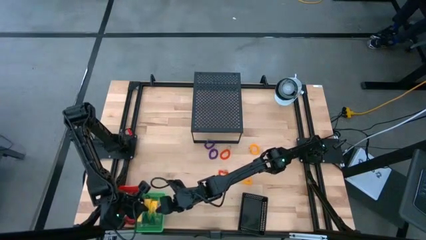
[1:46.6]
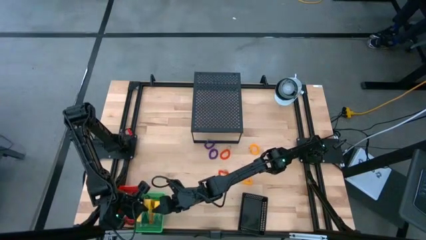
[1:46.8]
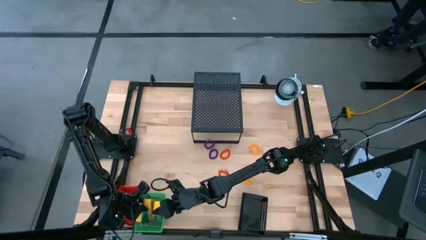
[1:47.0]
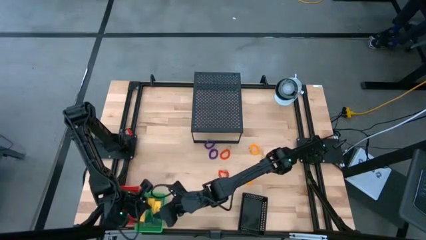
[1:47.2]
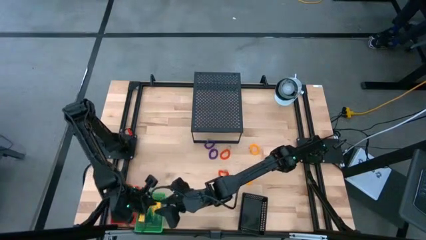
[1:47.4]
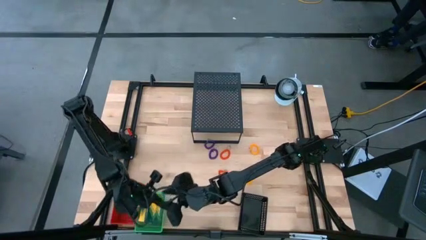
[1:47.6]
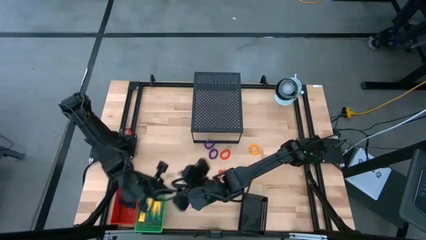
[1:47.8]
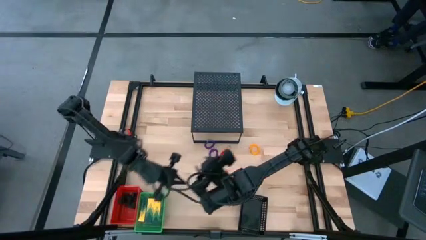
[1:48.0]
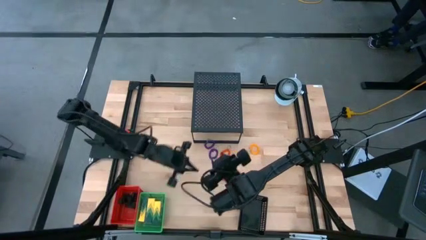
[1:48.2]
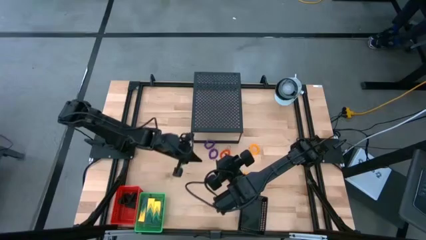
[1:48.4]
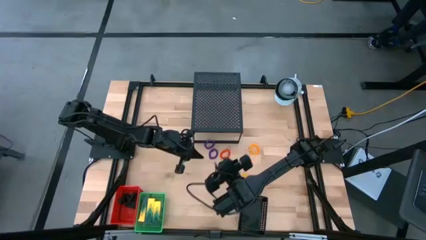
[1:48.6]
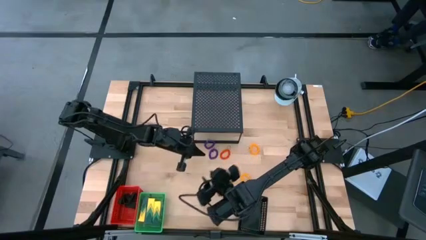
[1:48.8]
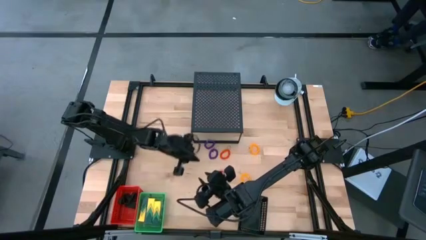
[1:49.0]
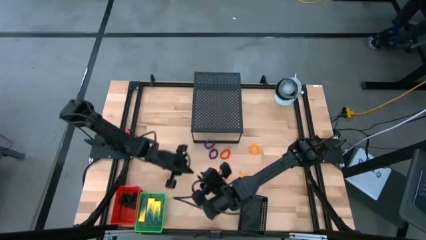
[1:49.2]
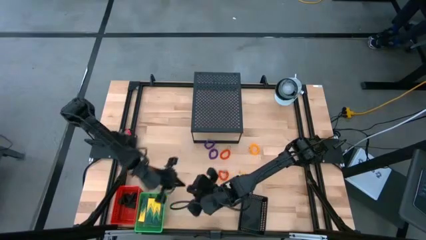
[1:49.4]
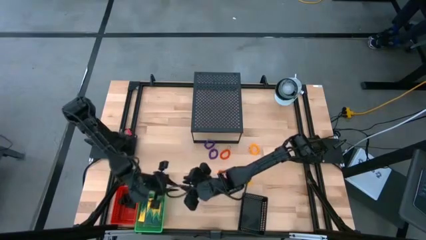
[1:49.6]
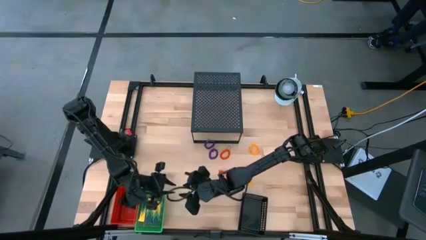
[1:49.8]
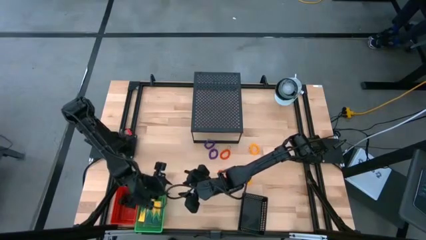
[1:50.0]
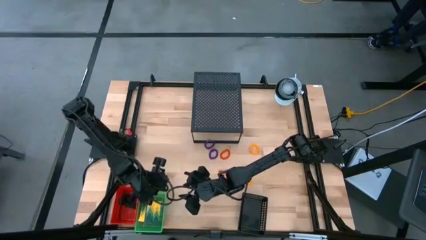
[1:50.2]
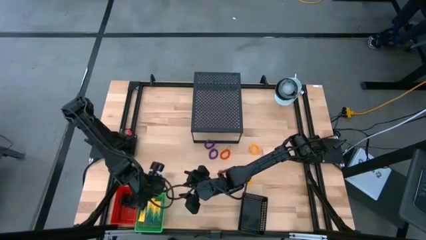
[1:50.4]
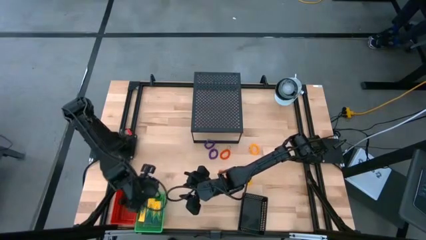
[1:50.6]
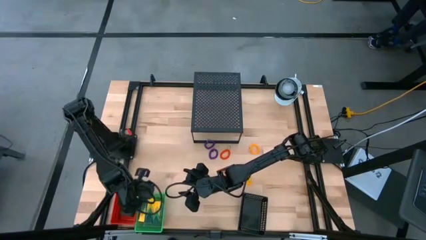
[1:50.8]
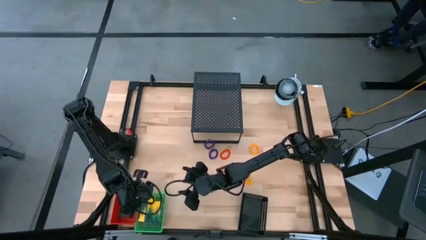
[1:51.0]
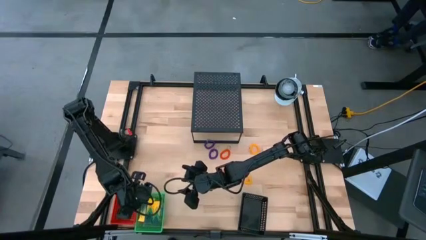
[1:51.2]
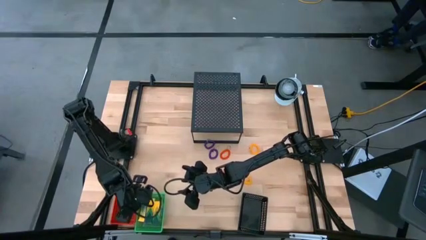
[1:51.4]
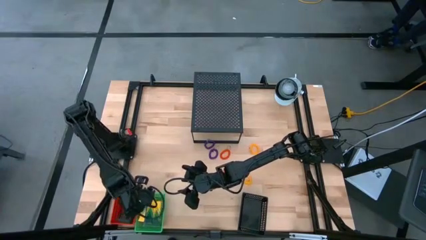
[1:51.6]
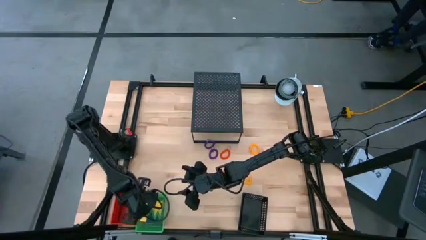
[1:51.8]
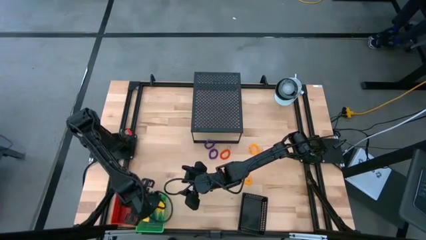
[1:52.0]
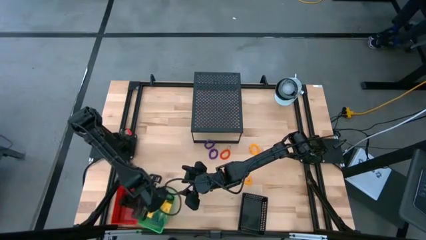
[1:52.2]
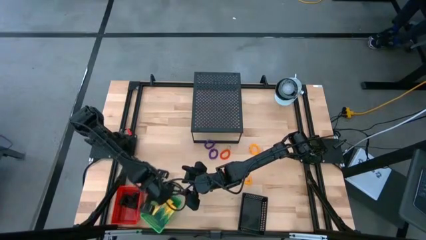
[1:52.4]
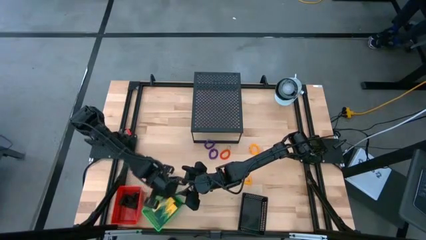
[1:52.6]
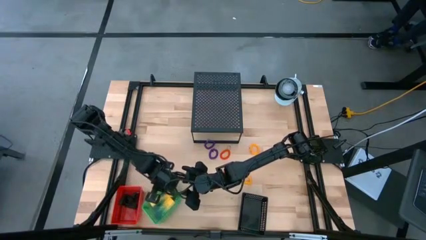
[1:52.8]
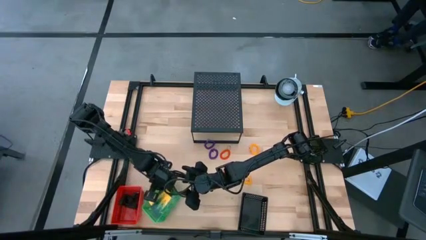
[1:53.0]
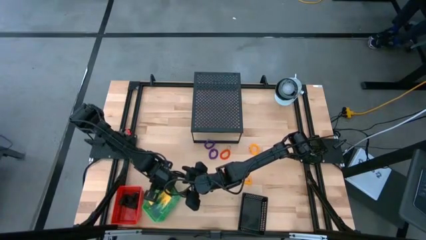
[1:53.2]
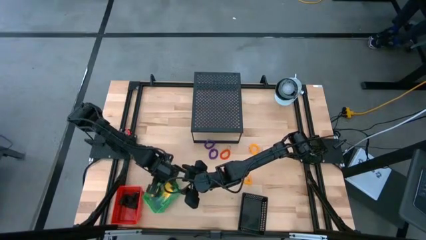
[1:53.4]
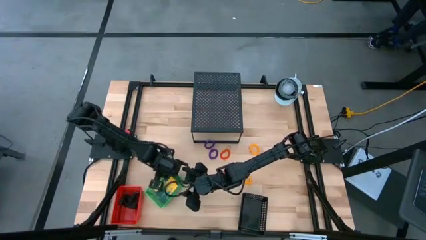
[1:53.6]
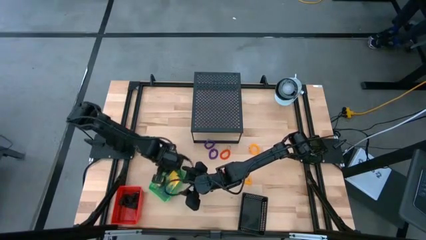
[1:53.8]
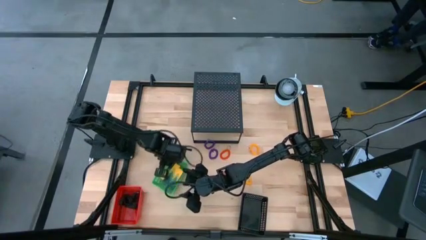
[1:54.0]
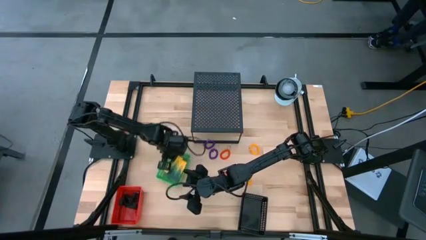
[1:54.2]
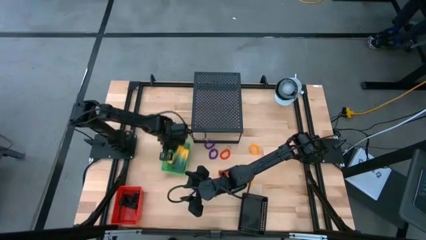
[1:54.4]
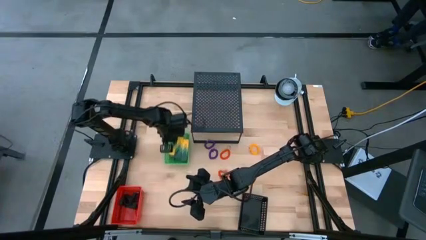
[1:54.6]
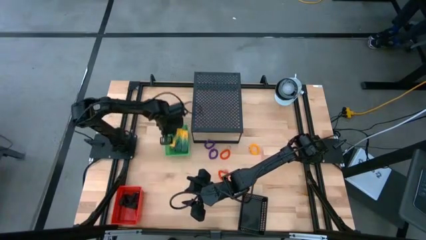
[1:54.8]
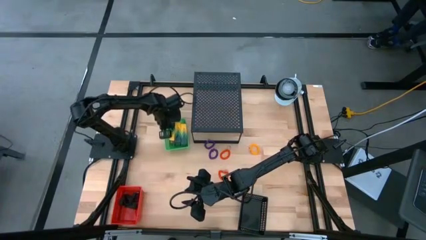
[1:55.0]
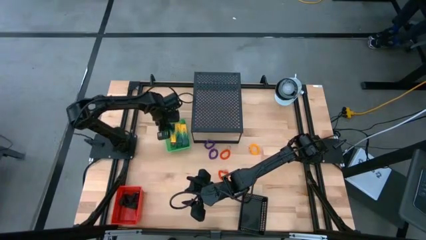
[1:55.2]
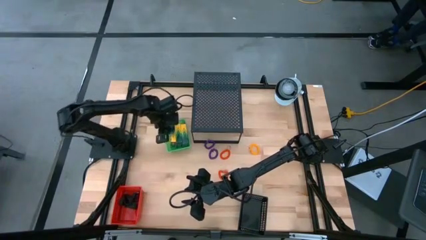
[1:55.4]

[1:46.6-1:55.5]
Task: Pick & Place Office Desk Supplies
Move the green bin to the top left of the table

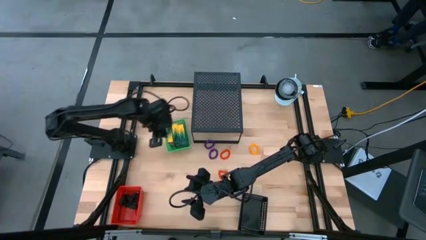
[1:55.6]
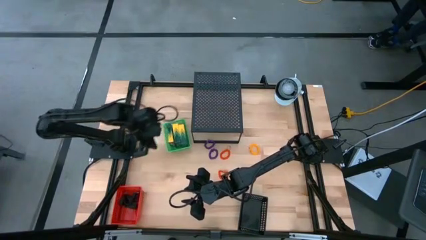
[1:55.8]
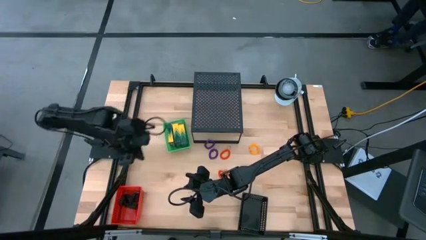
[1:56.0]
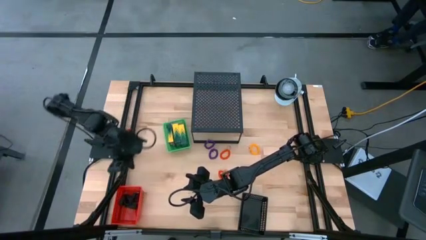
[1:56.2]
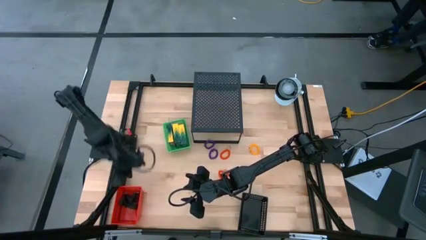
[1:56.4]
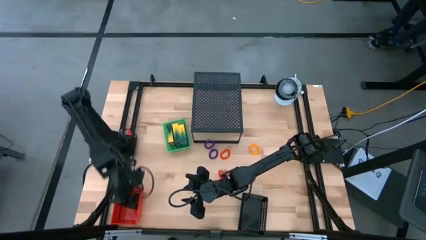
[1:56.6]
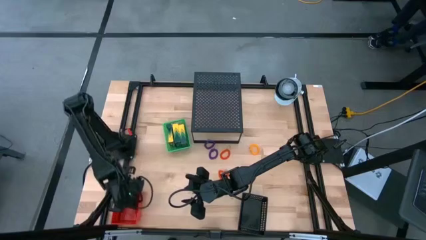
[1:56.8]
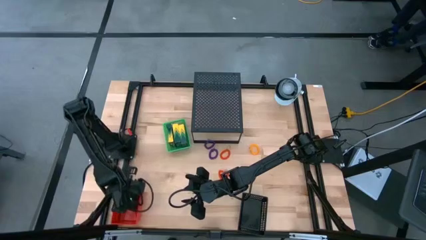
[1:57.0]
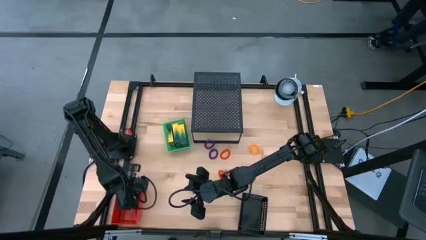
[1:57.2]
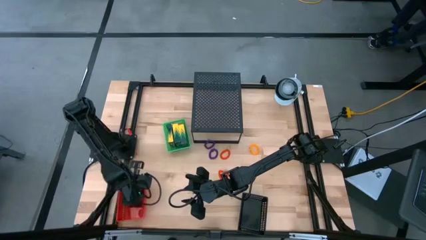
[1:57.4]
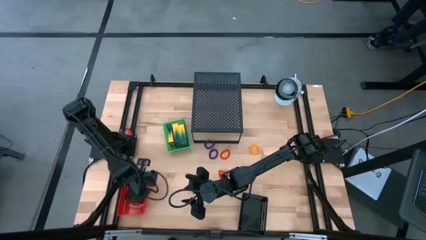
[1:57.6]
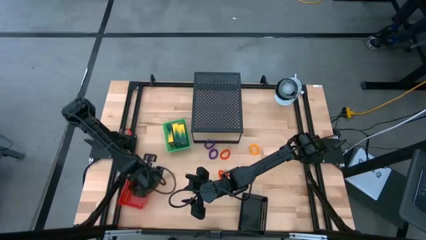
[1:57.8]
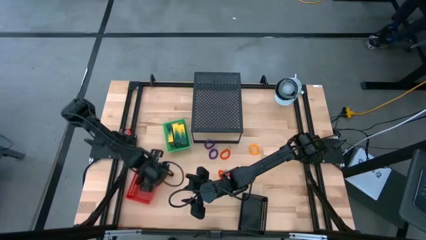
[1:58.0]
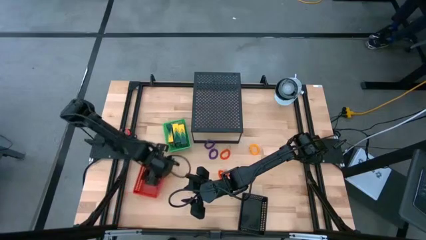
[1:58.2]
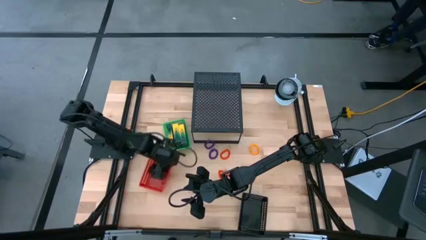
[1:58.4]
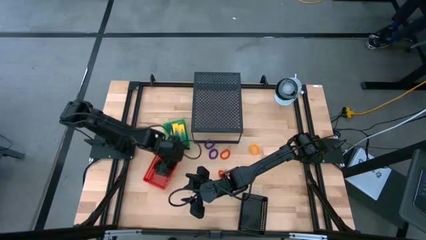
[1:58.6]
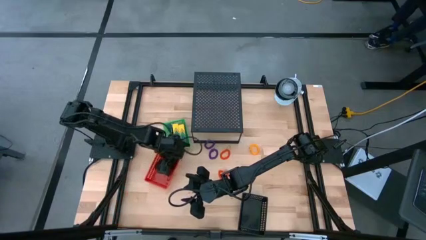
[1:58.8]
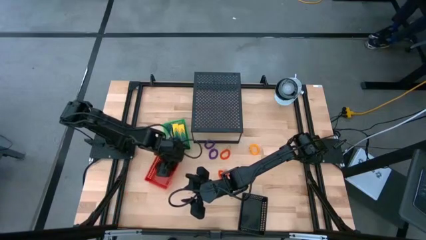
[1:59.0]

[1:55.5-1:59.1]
Move the red bin to the middle left of the table

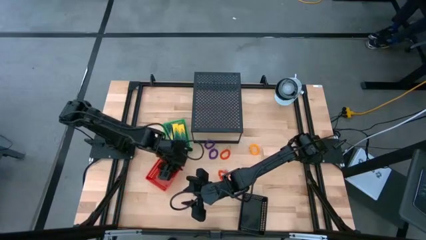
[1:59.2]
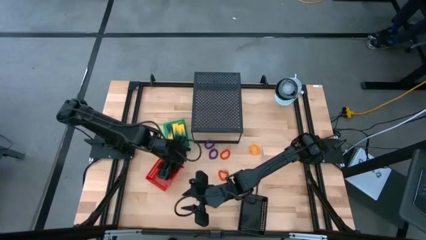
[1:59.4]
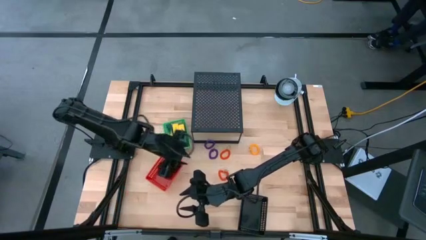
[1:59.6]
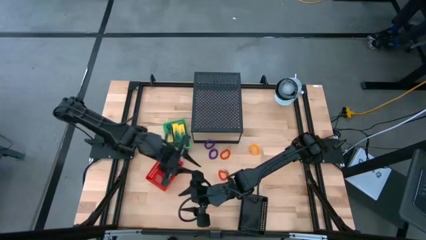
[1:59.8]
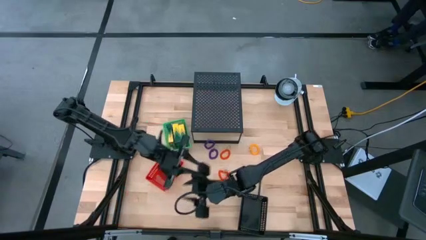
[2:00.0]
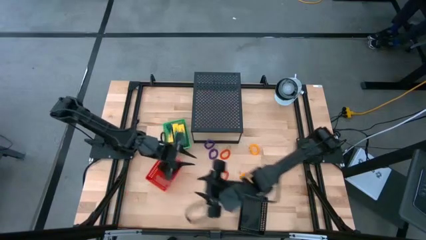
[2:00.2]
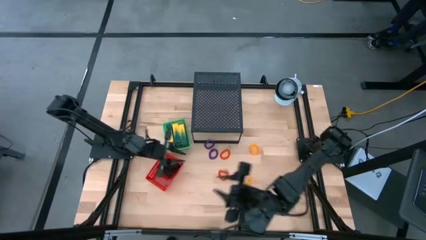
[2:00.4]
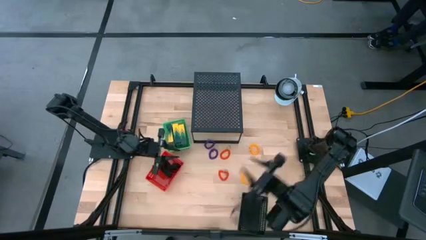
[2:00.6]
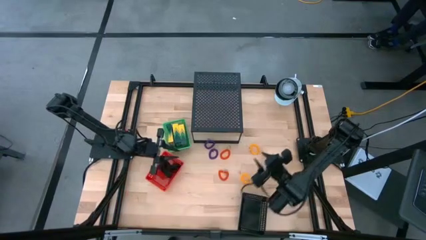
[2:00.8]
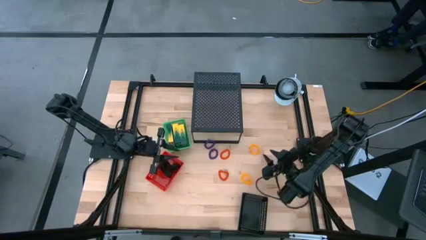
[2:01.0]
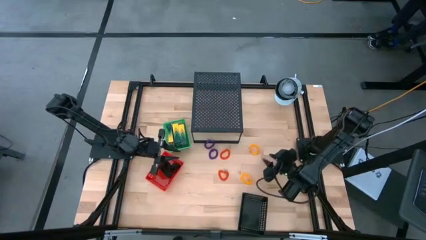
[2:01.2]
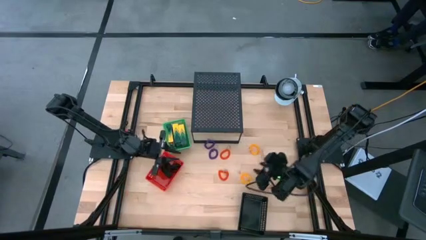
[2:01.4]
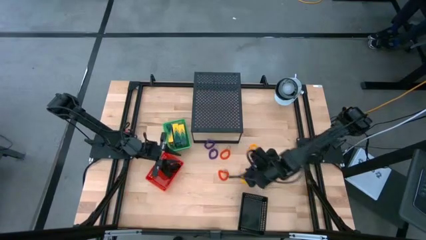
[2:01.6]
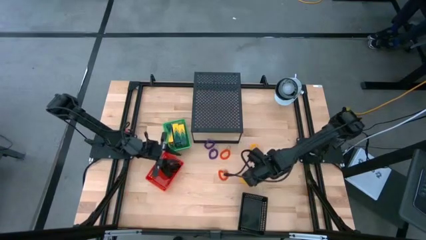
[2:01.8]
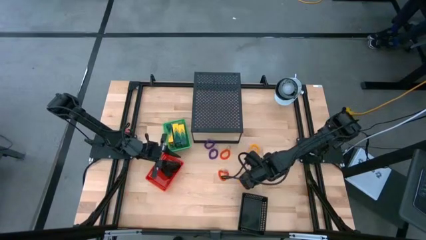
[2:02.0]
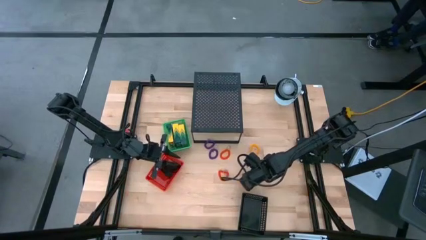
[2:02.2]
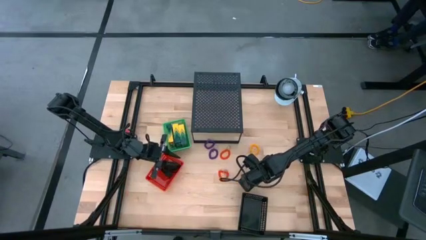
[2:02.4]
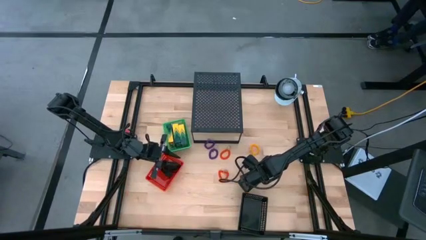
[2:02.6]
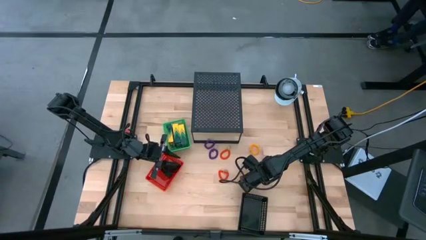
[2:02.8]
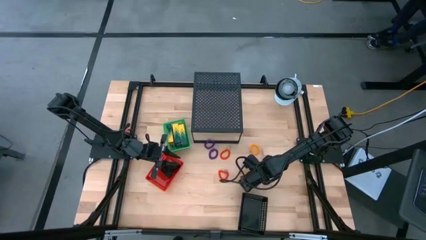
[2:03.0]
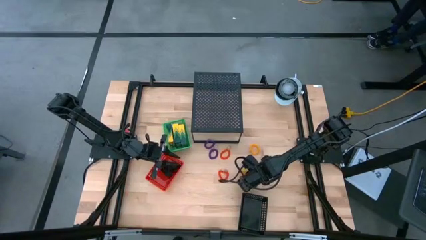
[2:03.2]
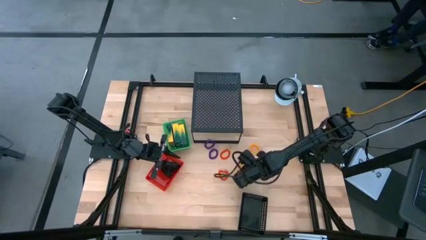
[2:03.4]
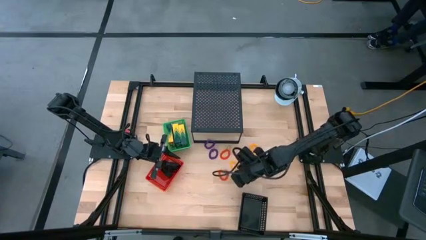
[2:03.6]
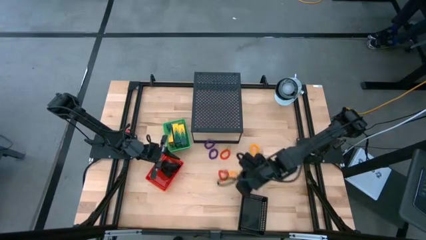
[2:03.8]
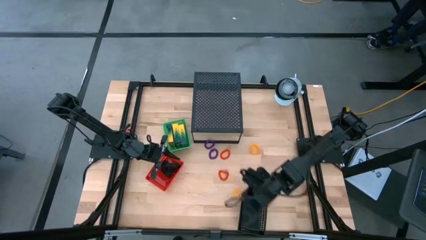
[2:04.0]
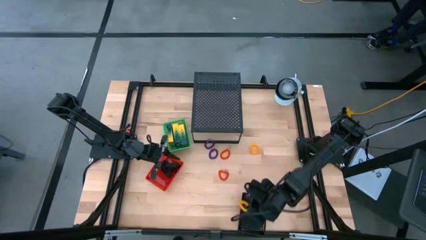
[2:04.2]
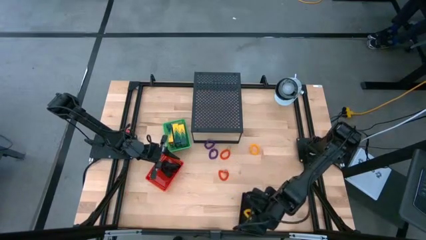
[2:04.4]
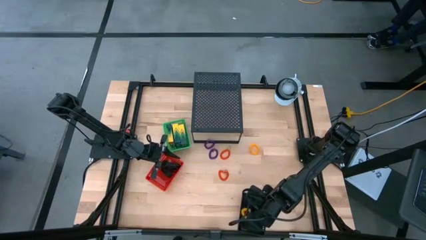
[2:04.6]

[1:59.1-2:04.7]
Put the yellow spring keychain into the black bin
